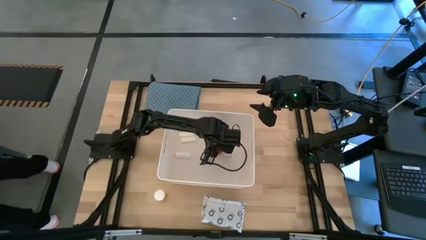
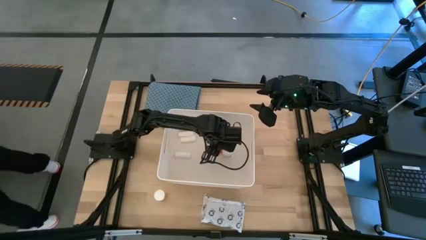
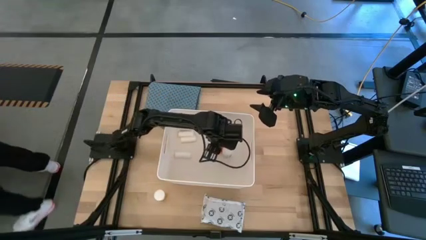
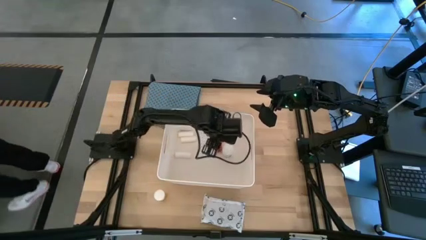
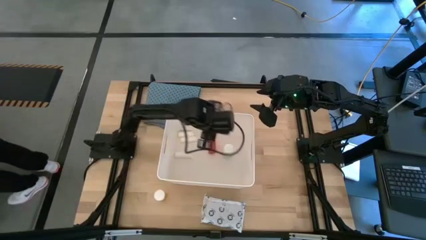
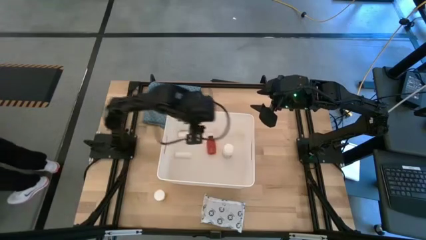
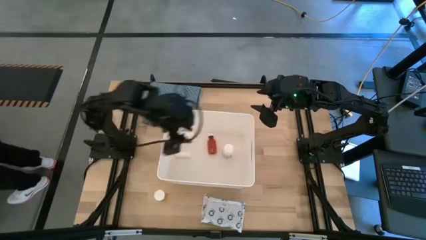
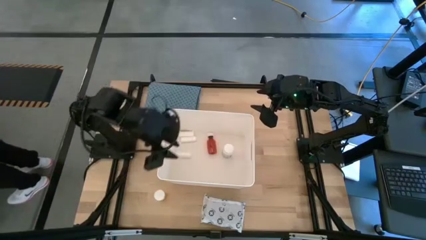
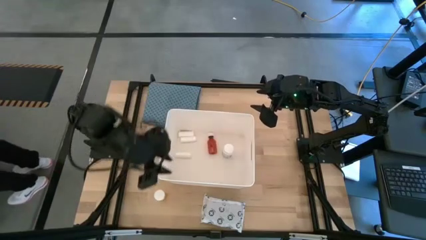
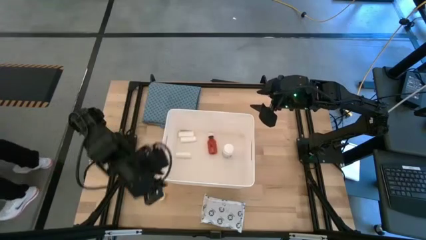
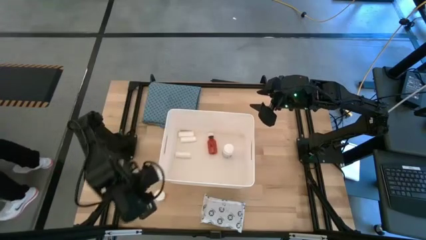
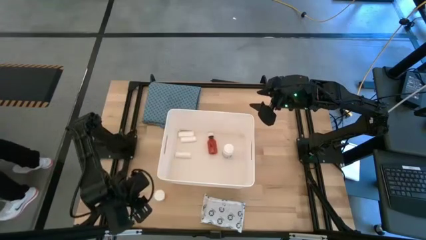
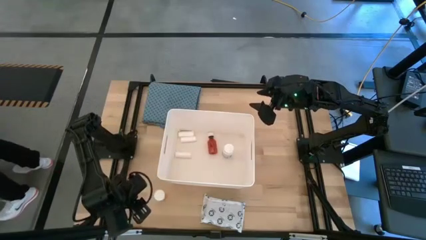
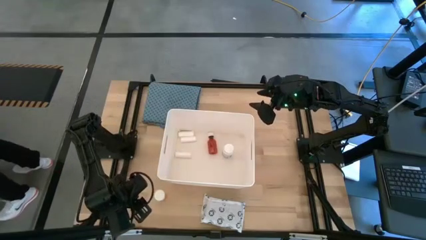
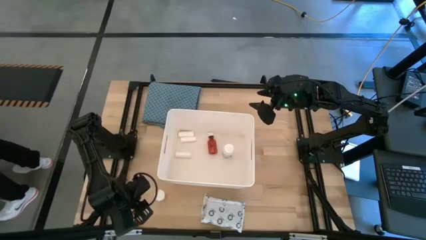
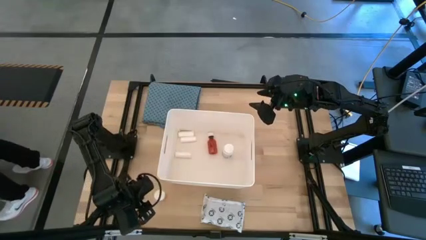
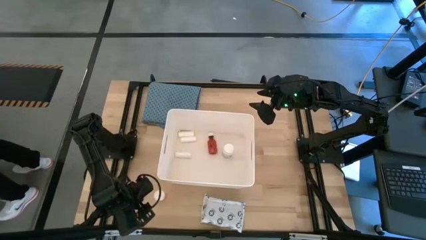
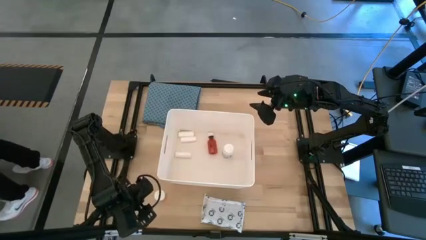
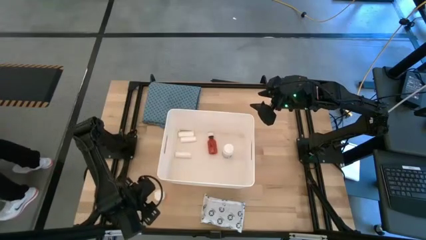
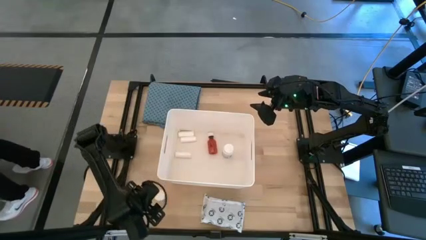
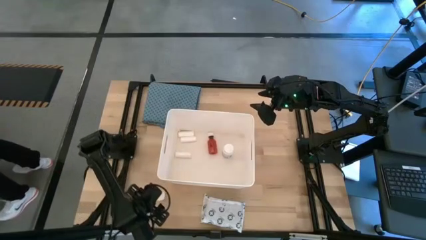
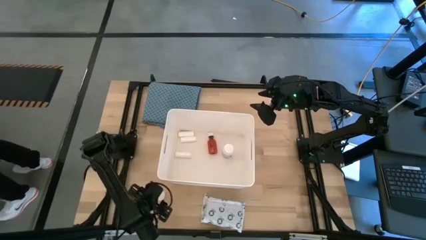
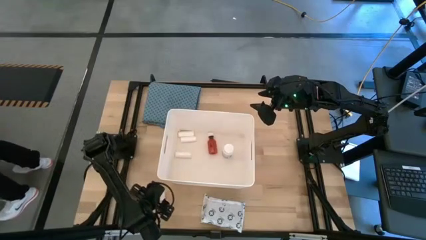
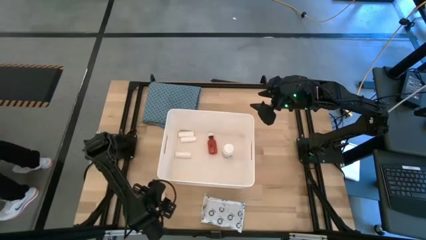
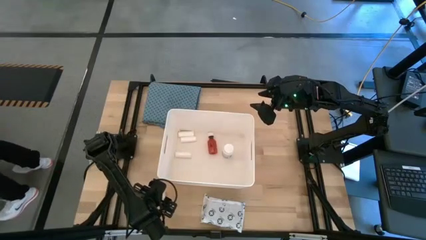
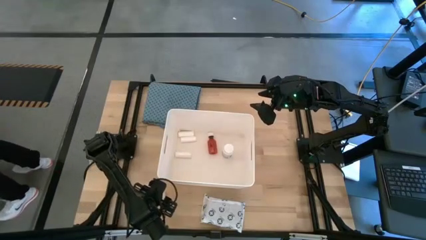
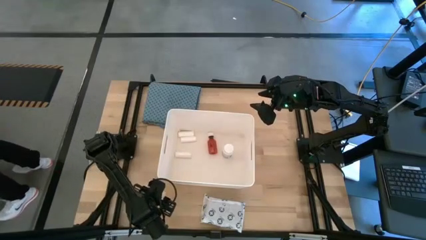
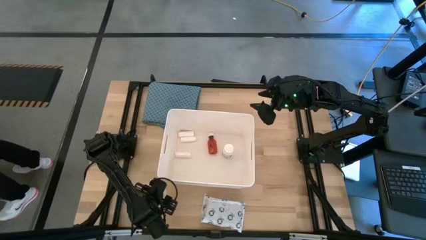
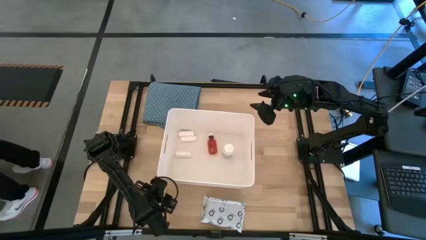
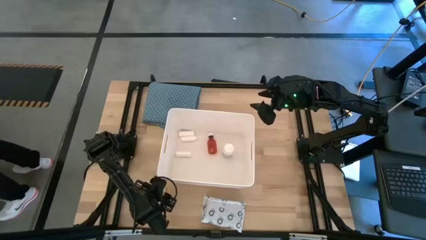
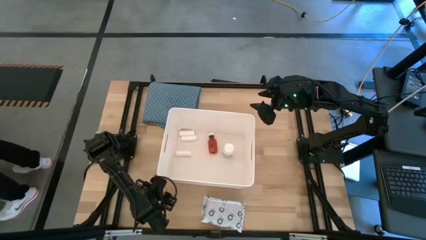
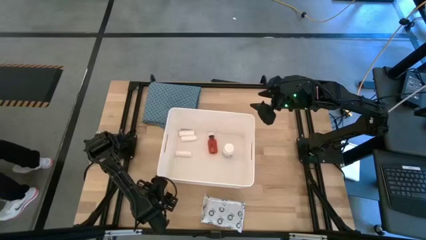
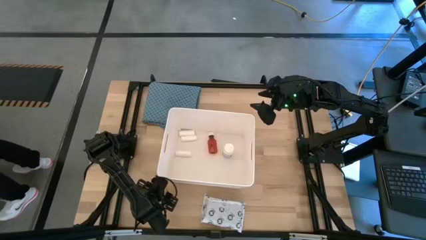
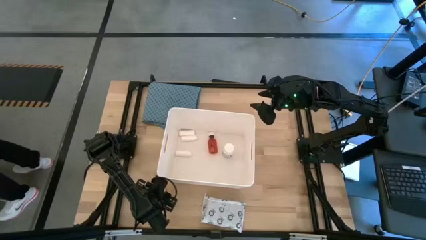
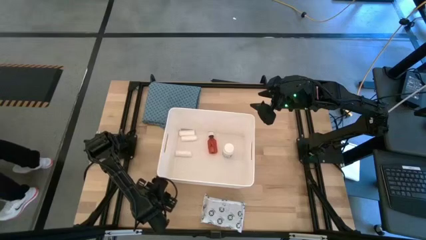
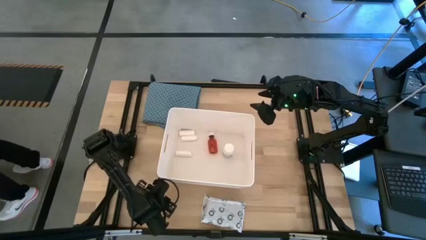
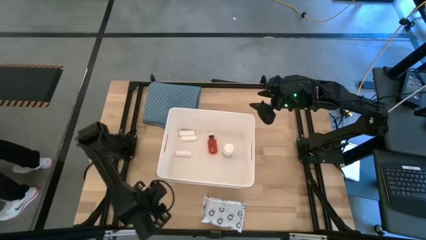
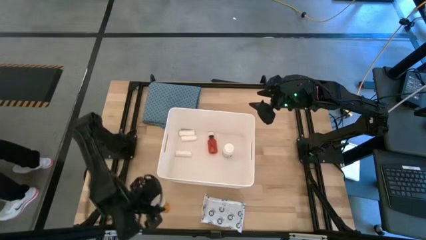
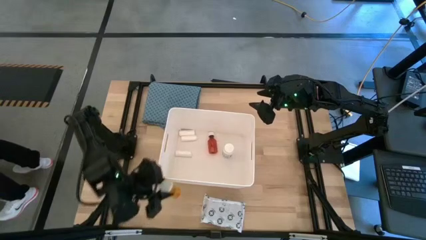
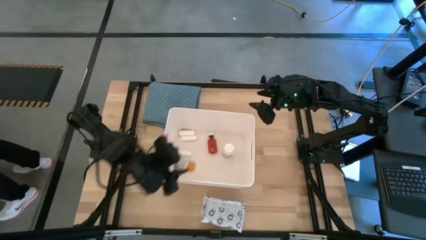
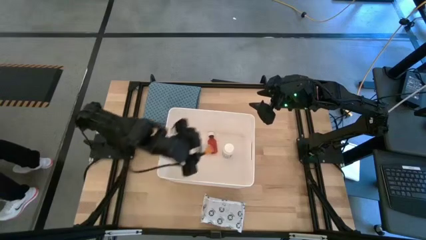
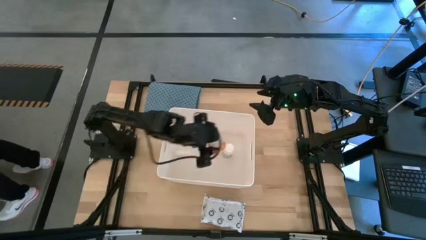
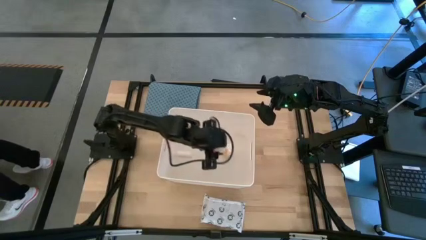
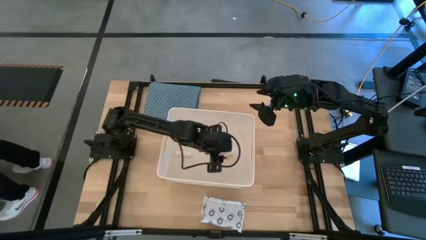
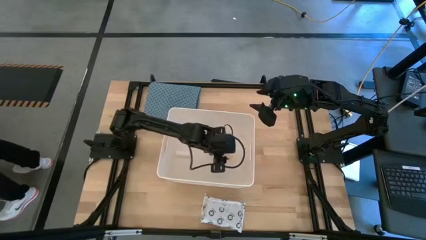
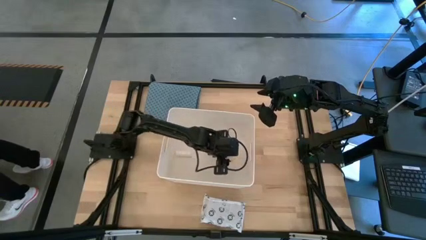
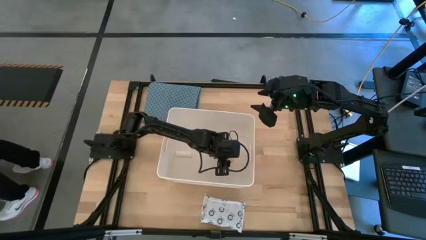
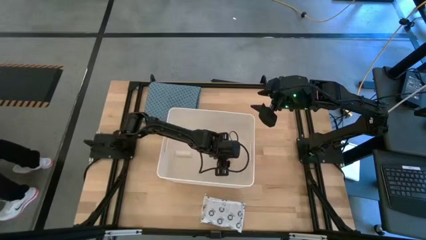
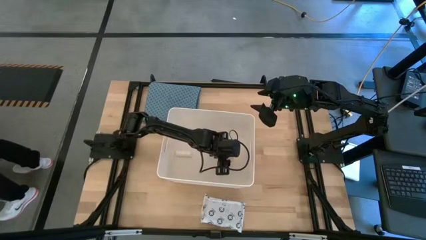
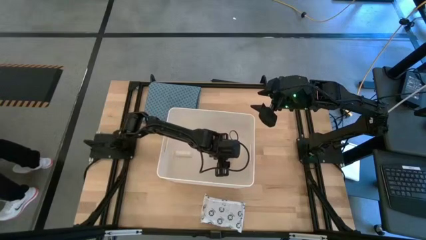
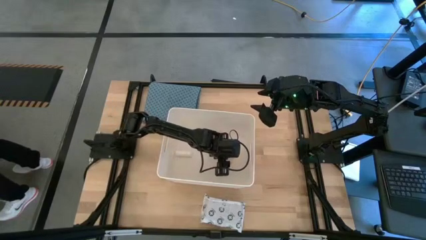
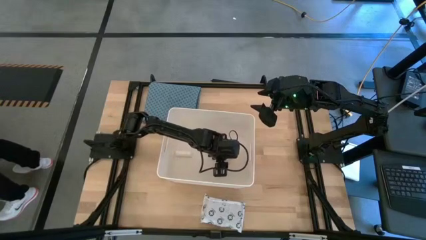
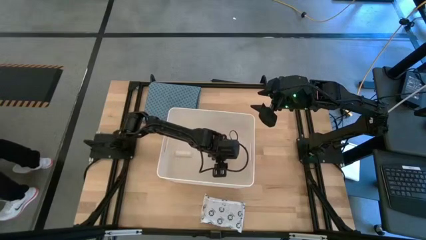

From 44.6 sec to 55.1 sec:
Task: Pick & place medical supplies in basket/bin
Put the yellow medicine bottle into the white basket

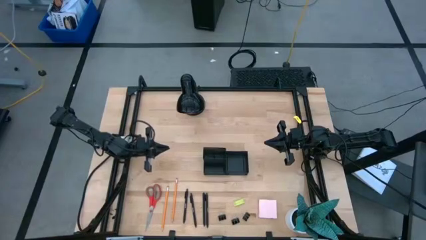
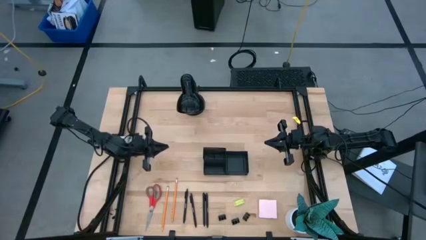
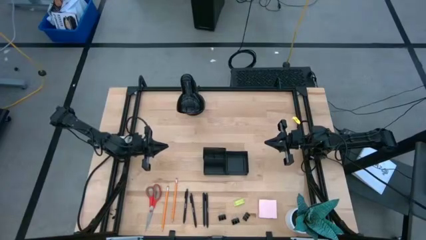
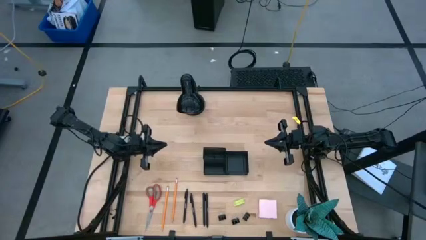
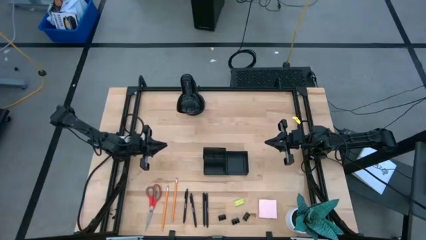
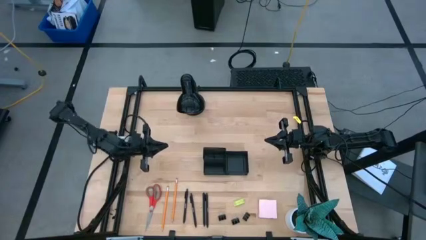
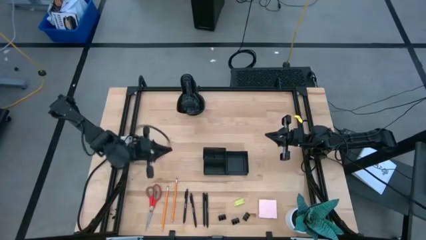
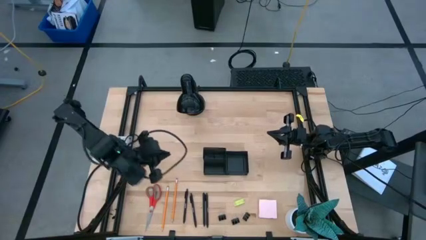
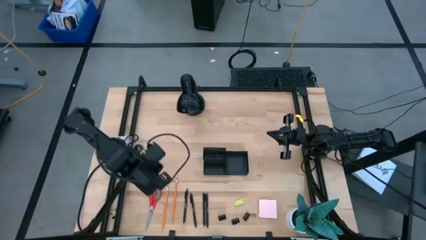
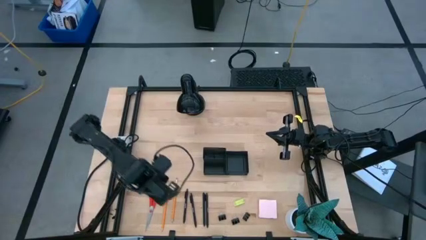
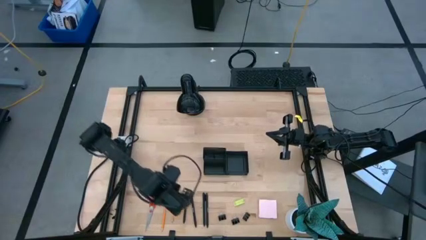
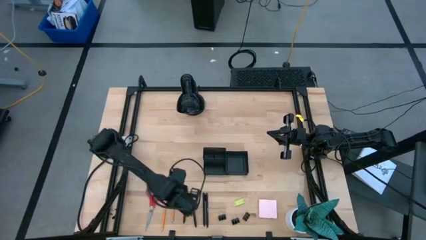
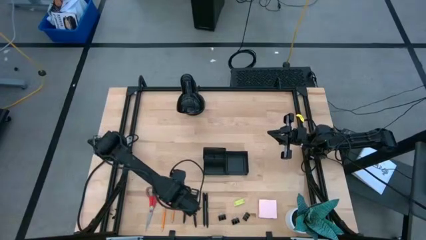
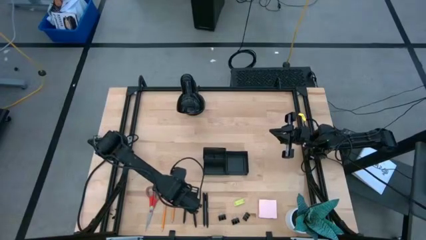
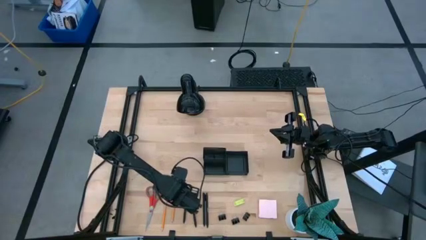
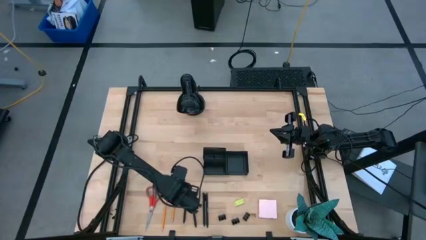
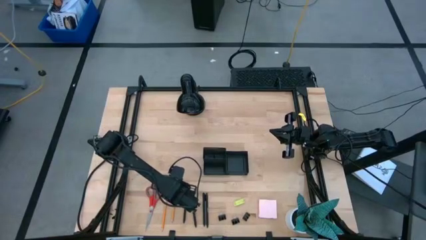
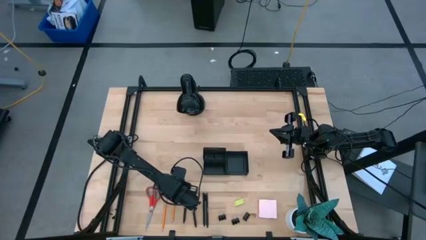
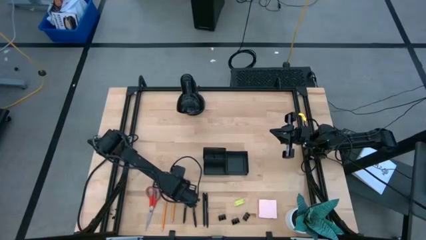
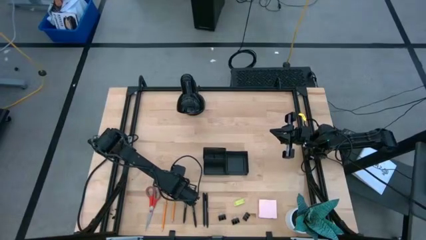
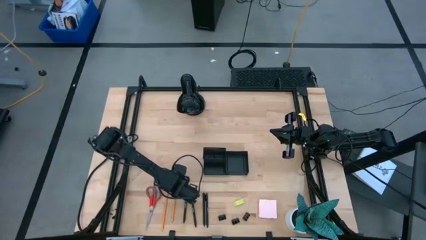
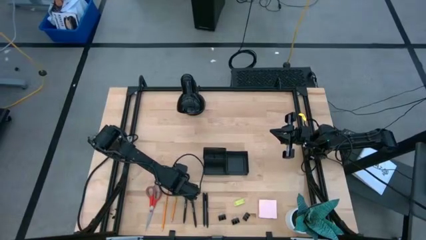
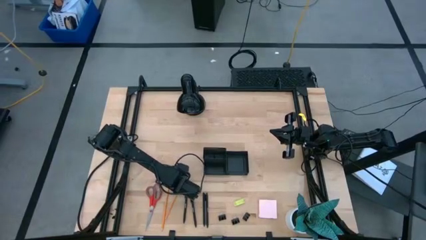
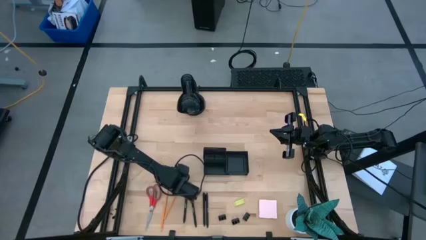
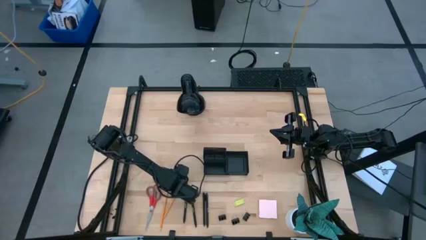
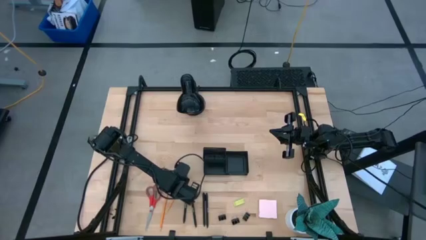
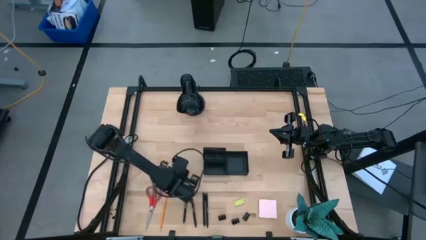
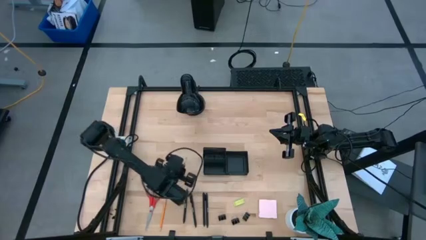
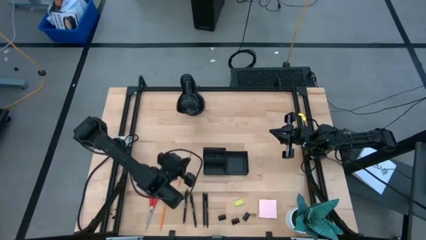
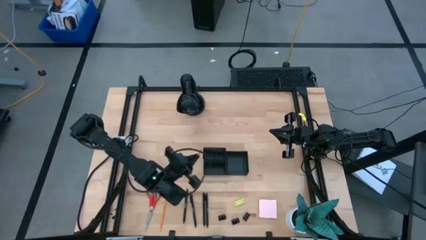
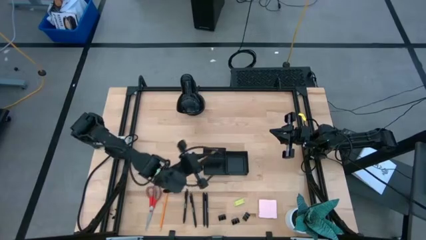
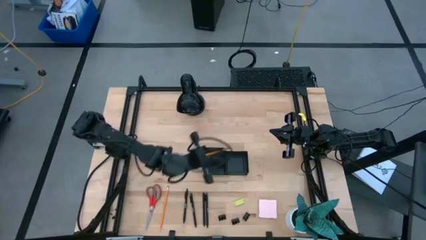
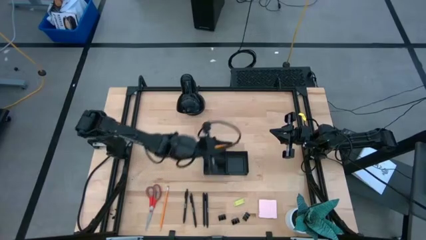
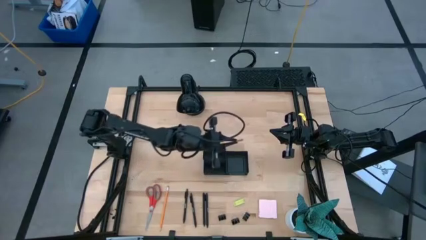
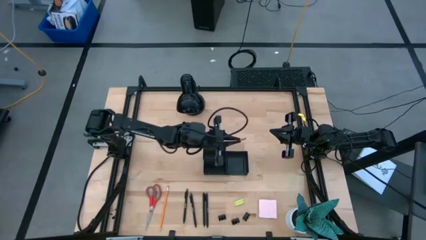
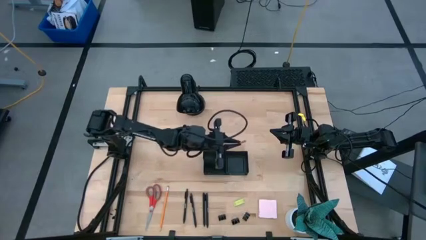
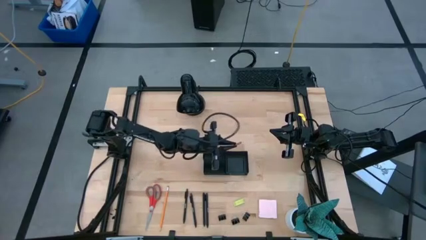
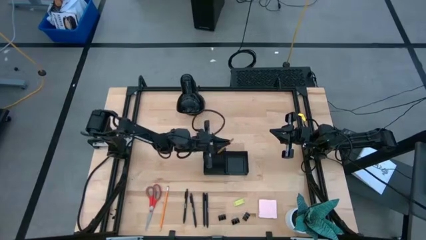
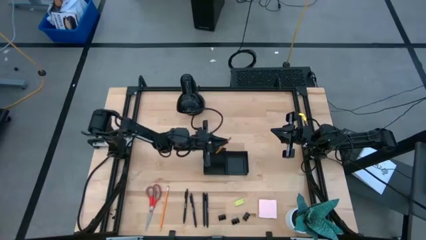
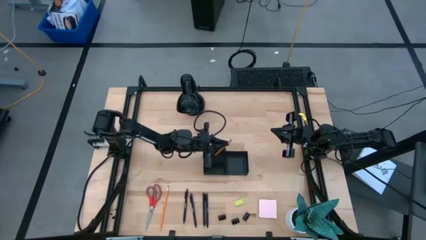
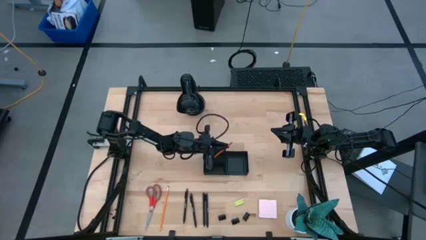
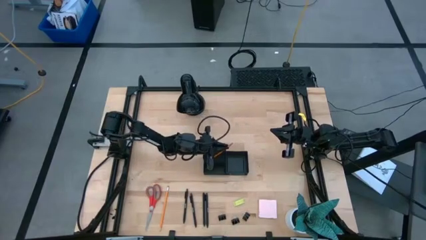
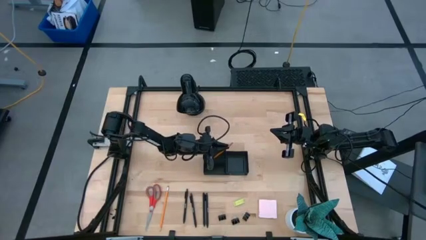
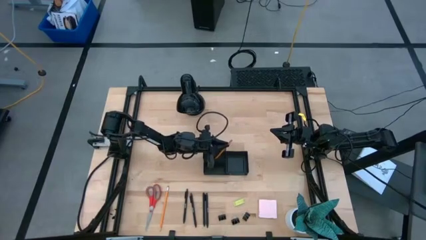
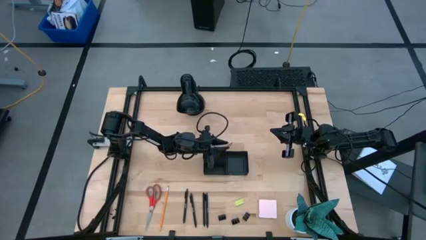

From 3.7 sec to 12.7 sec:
Task: Pick and place office supplies into organizer
Put the right pencil into the desk organizer
